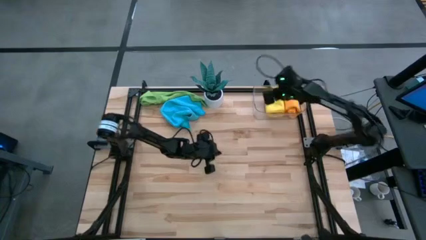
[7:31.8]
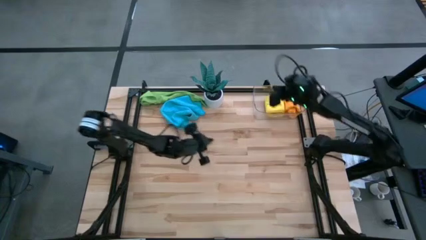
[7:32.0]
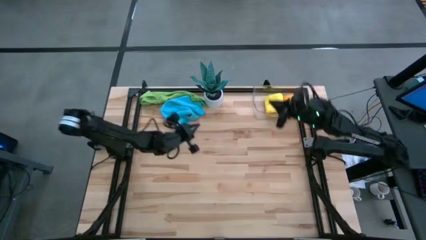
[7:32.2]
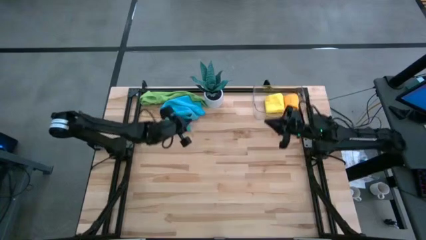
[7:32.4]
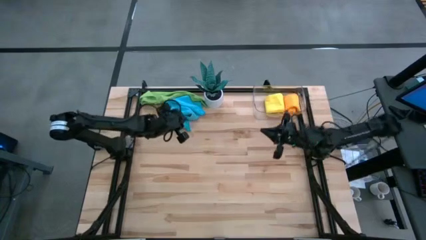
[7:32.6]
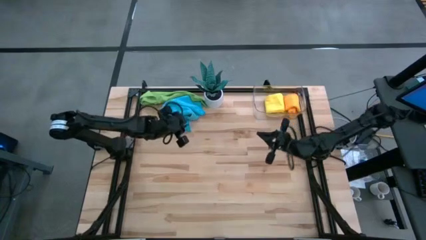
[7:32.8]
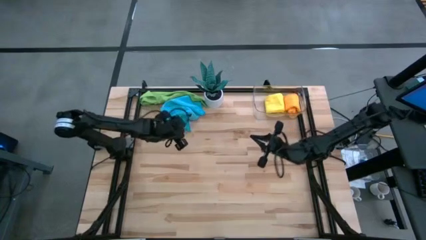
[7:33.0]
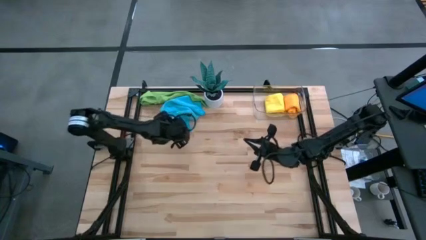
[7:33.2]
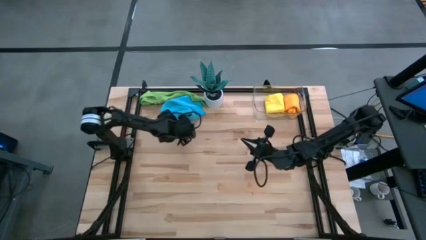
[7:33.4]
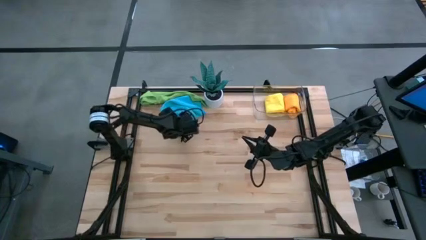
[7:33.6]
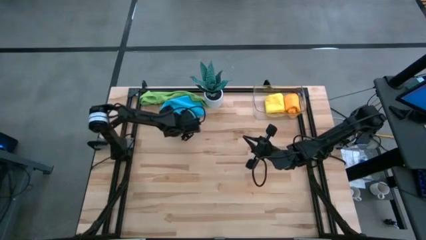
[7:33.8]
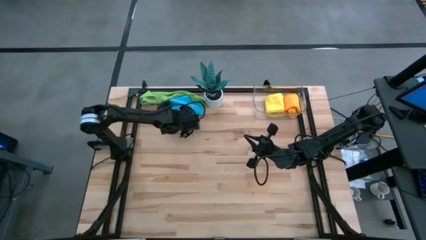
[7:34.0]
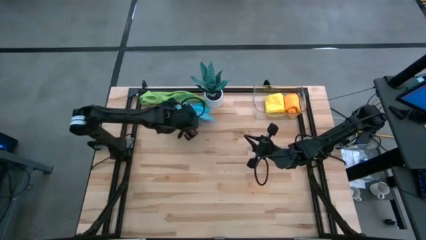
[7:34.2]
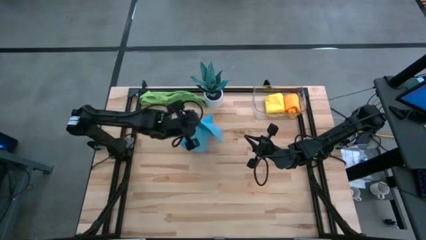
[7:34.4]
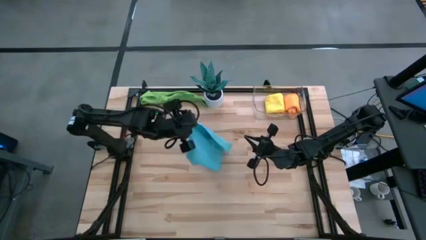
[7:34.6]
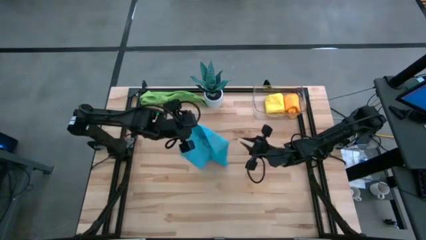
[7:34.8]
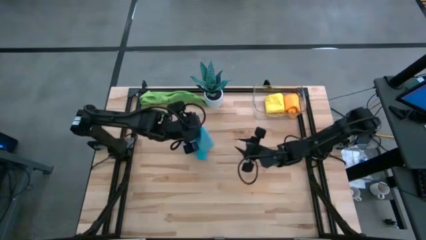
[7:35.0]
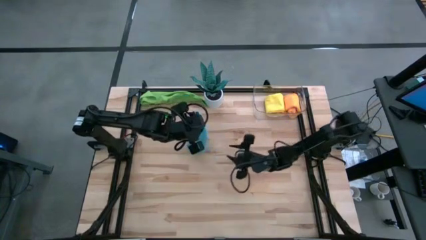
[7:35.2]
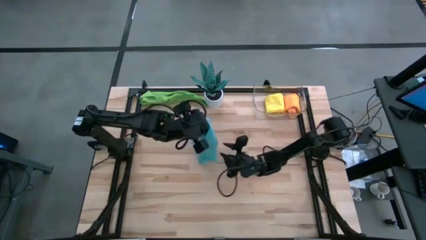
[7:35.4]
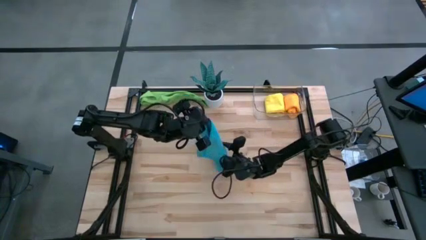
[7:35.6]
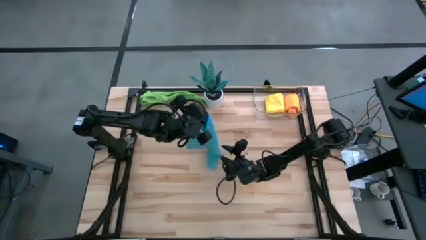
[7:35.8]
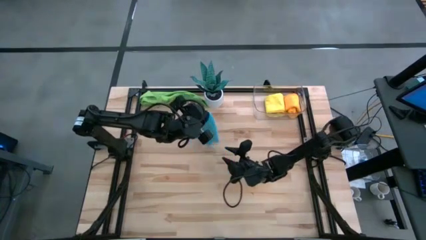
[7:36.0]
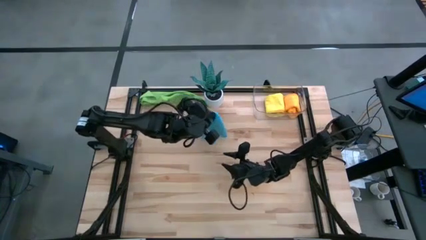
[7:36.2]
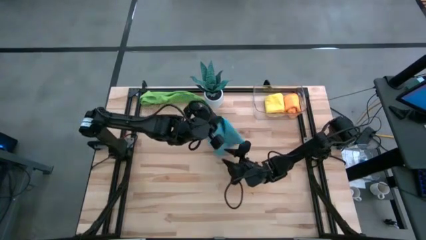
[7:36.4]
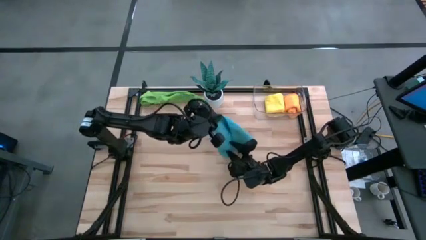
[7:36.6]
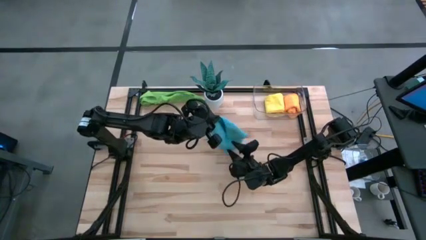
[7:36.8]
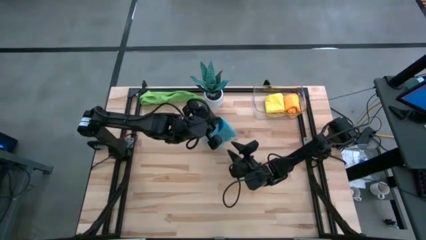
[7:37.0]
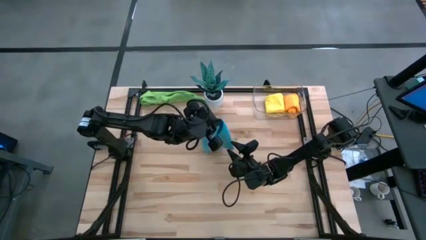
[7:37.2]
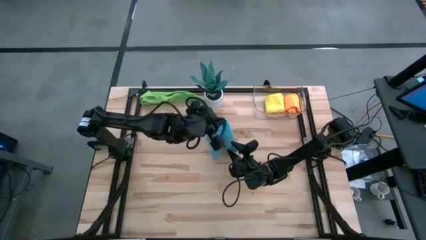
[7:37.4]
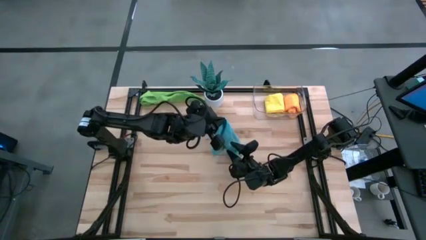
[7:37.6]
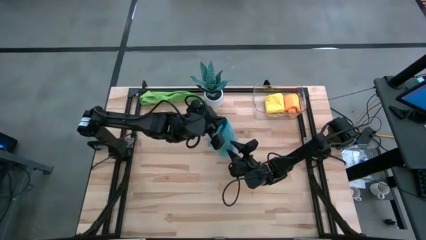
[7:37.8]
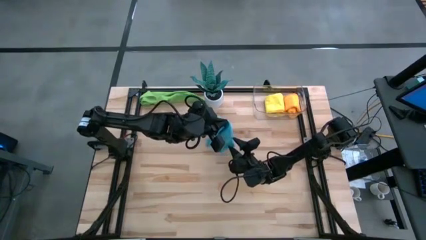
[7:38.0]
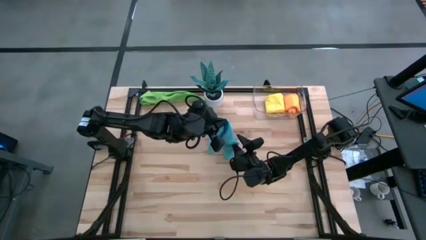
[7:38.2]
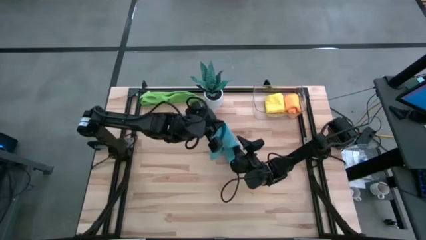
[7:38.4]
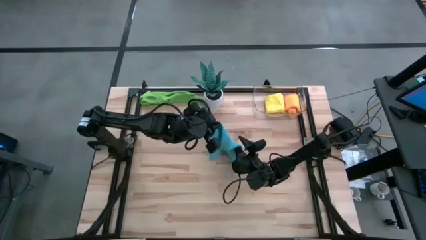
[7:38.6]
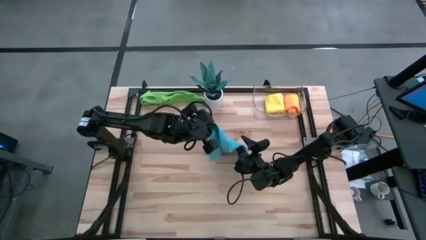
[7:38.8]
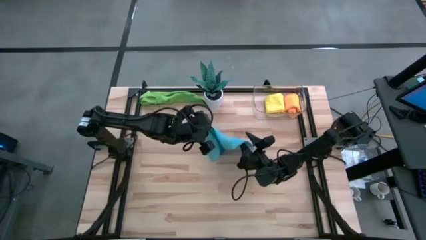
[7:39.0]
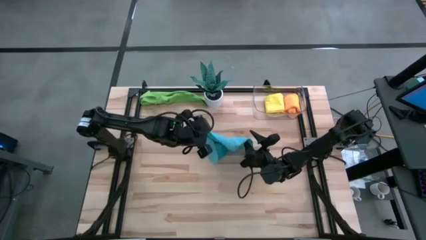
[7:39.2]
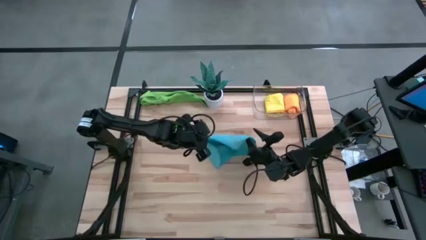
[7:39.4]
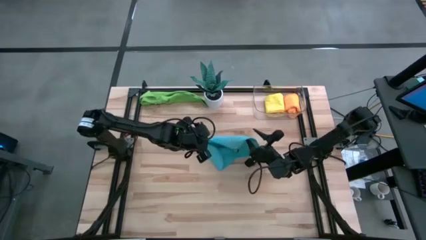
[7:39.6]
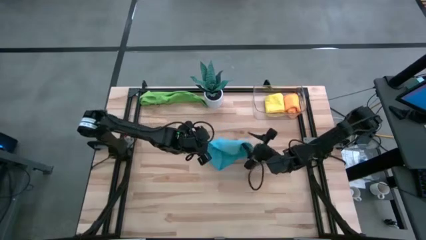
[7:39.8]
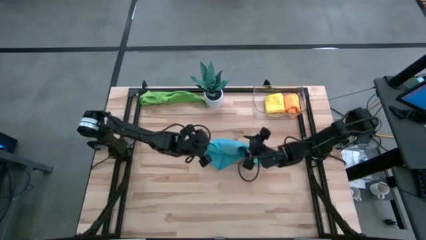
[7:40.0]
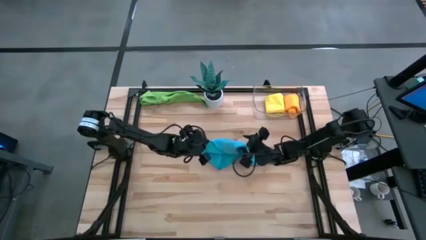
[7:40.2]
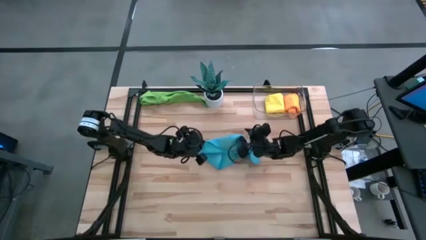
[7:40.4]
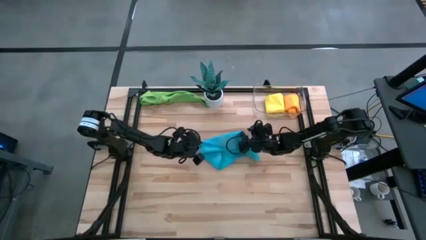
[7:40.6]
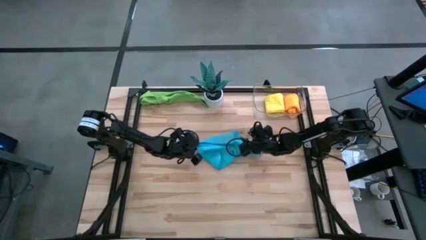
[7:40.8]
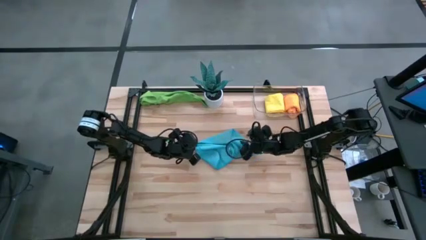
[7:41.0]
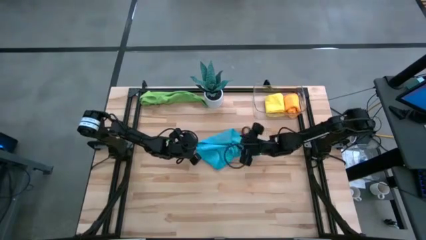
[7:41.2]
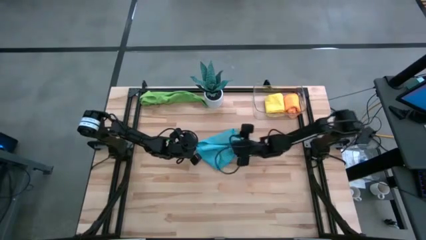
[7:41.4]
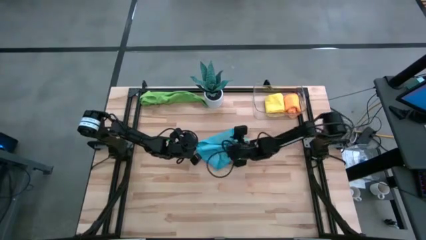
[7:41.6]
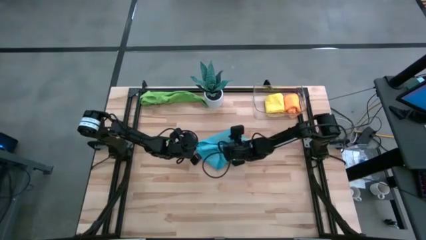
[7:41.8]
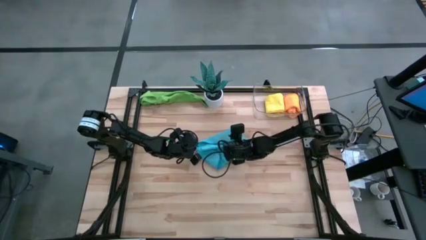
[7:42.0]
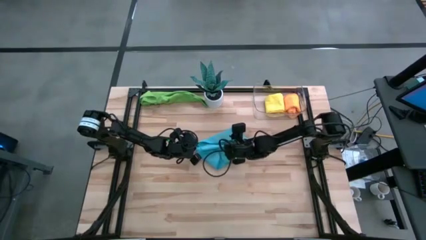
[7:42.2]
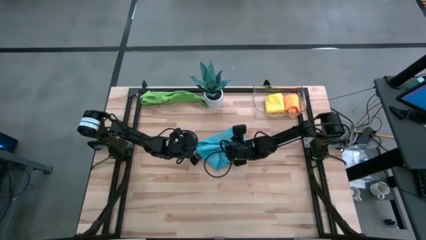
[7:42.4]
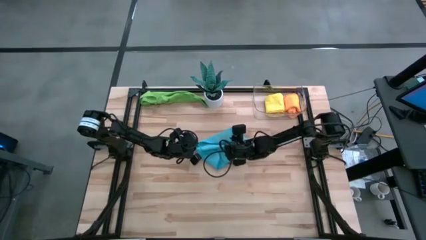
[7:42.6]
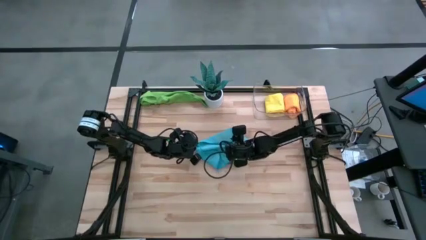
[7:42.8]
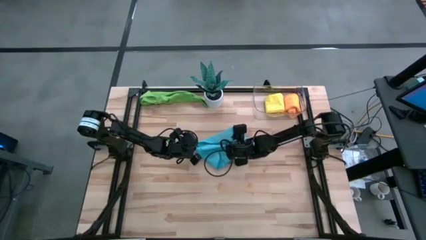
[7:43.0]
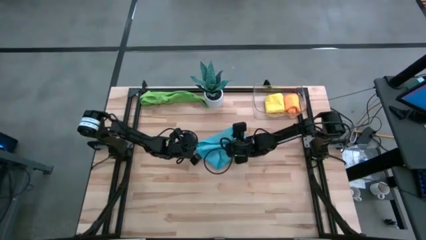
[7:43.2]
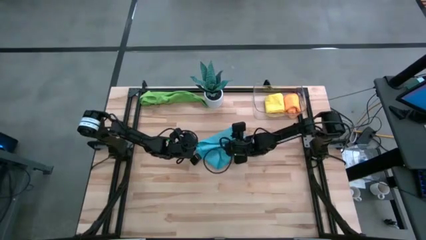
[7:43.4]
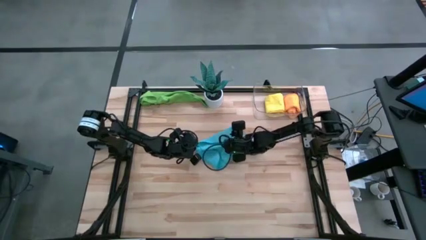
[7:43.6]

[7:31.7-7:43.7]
Task: Roll microfiber towels into tight, uniform cylinder then place into a basket
Fold the blue microfiber cloth

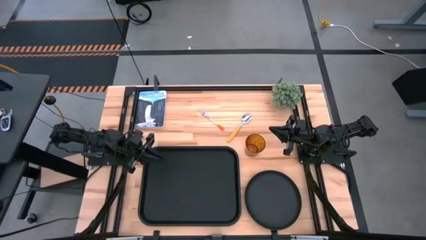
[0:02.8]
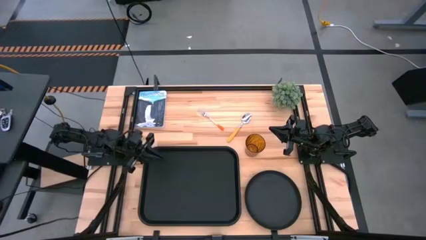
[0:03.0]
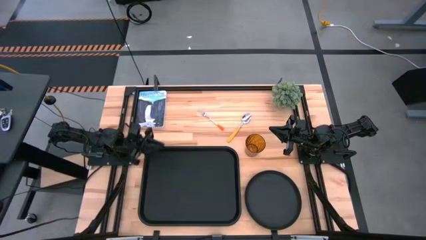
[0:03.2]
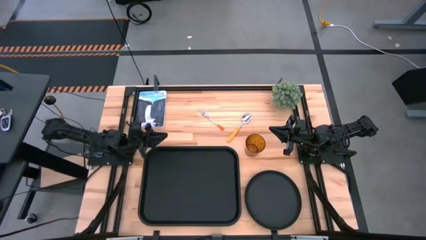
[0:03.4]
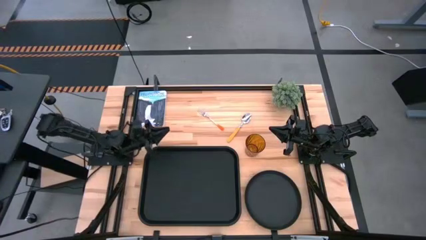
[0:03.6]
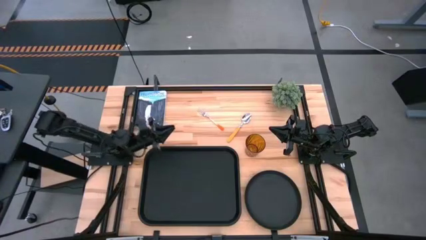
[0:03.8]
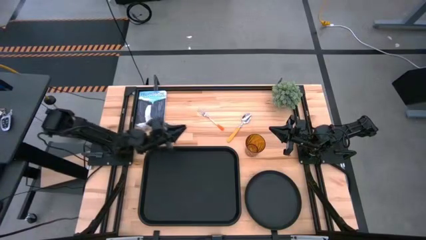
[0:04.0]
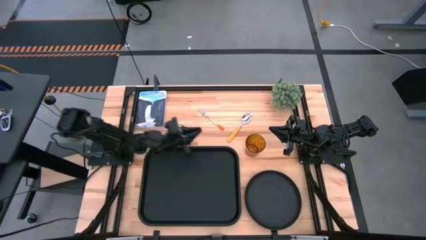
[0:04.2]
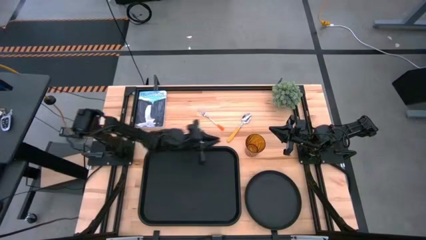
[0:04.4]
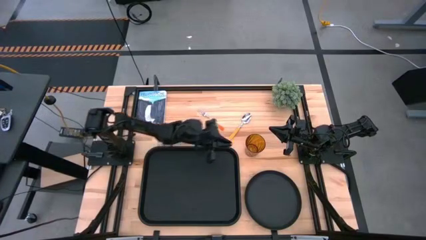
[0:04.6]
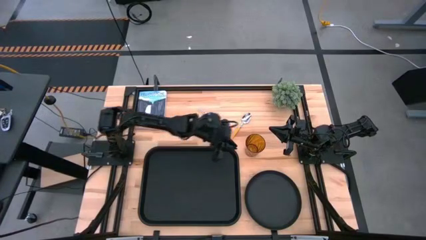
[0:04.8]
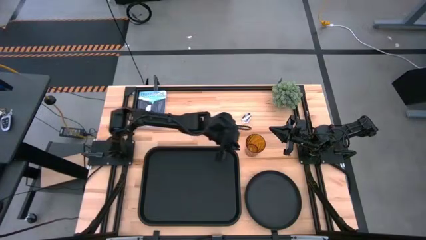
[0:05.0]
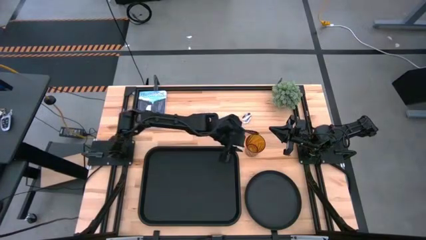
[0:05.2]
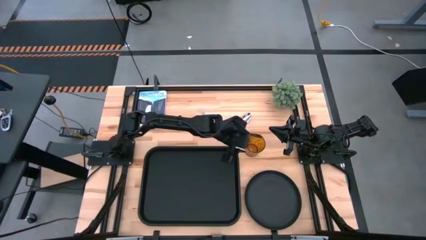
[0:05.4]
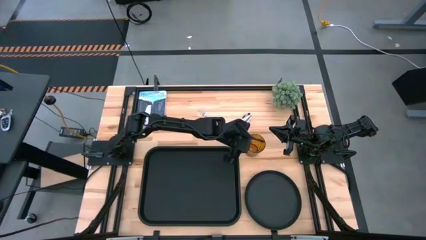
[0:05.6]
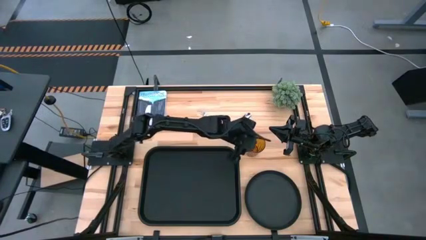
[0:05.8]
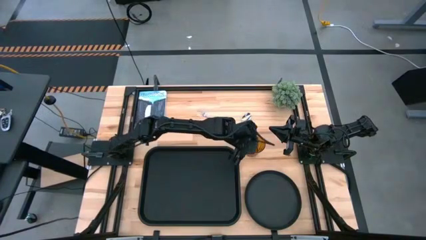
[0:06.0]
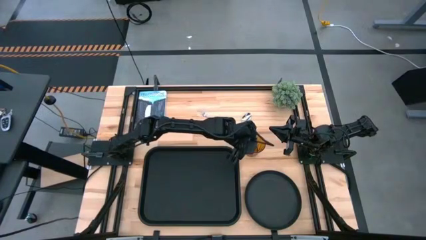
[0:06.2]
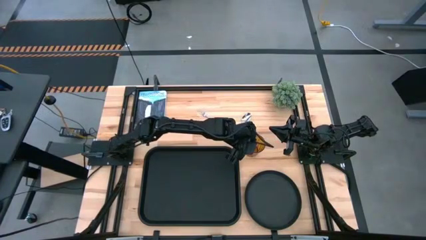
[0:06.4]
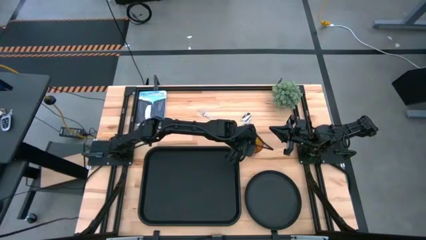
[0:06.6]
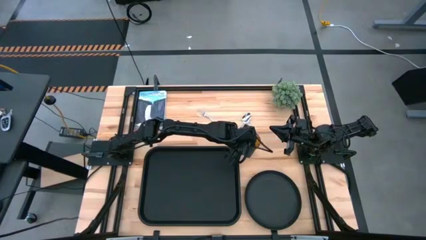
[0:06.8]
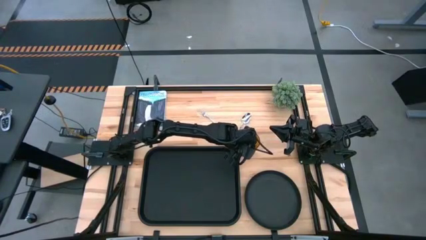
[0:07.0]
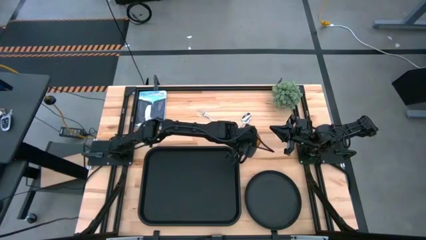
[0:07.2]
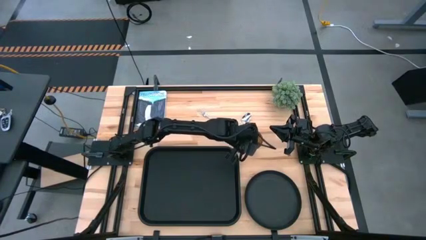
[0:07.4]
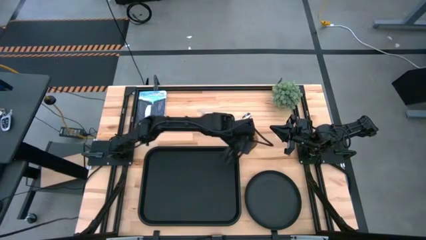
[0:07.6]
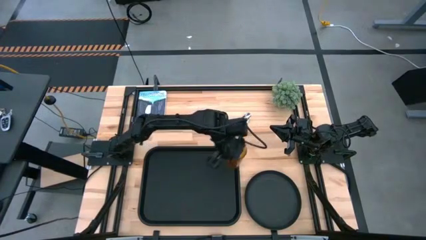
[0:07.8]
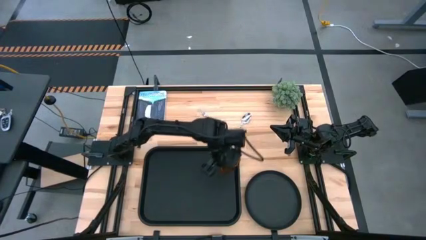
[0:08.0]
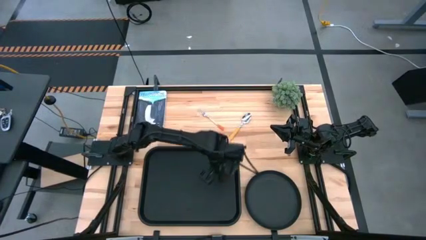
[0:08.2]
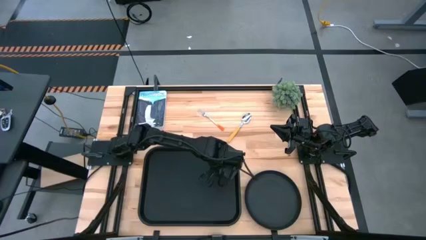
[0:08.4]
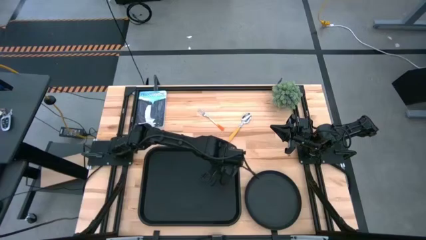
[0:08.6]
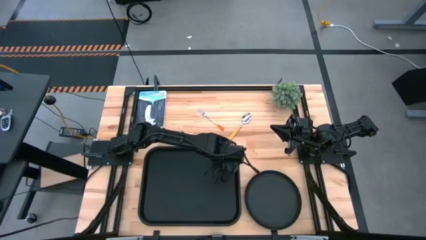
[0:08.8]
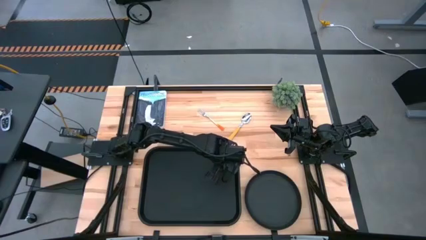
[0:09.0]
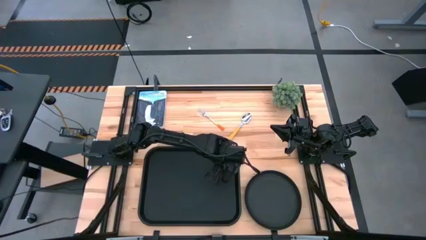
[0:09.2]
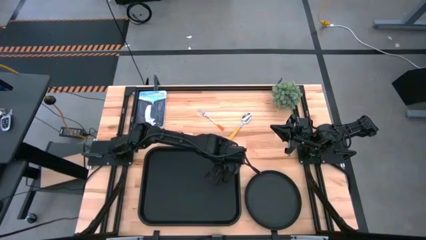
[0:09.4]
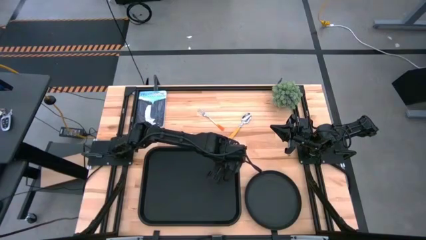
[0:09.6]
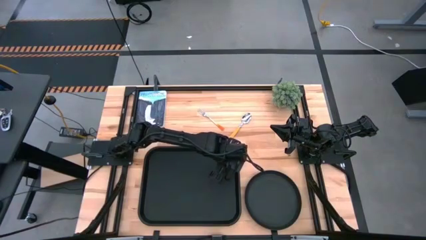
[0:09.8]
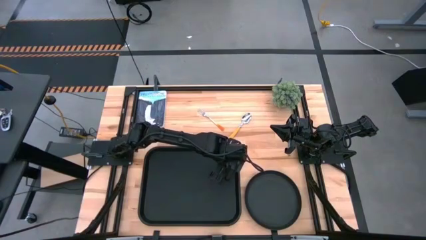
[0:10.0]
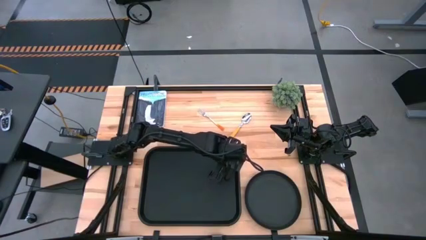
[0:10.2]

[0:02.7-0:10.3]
Task: Pick and place plate/cup/fork/spoon on tray
Put the orange cup on the black tray to the top right of the black tray
